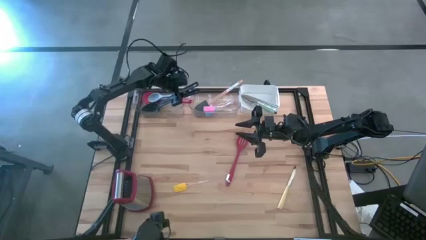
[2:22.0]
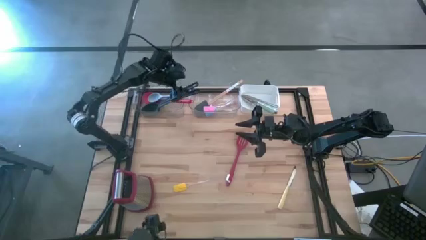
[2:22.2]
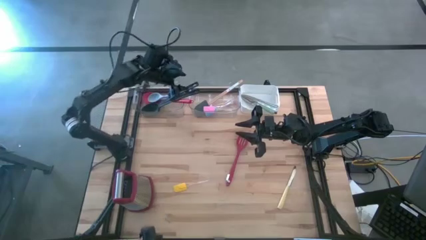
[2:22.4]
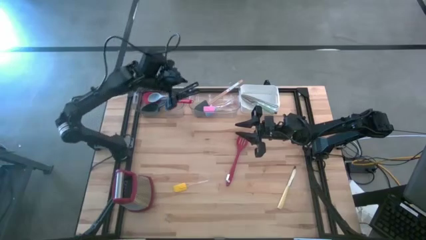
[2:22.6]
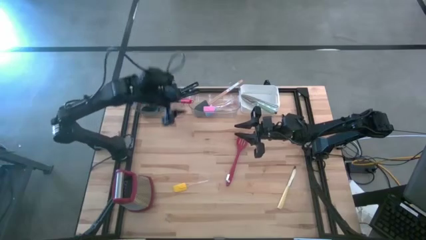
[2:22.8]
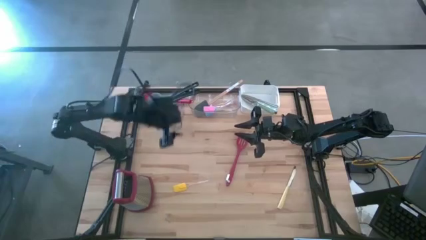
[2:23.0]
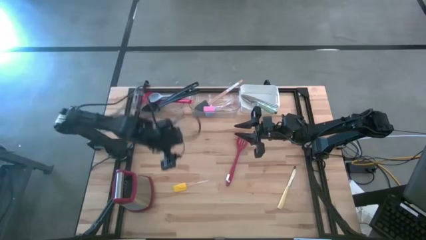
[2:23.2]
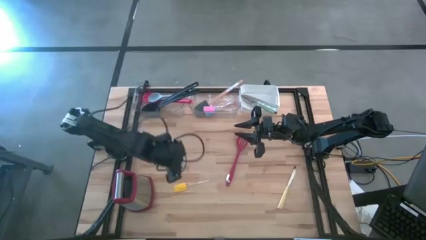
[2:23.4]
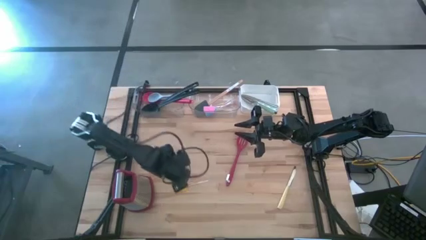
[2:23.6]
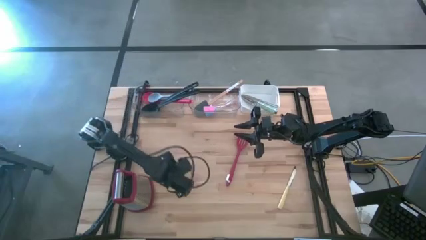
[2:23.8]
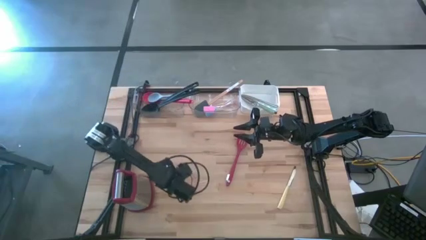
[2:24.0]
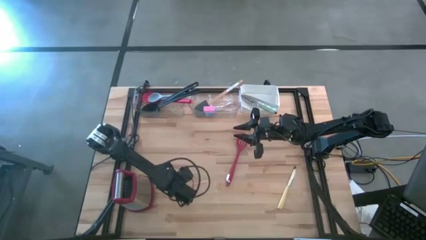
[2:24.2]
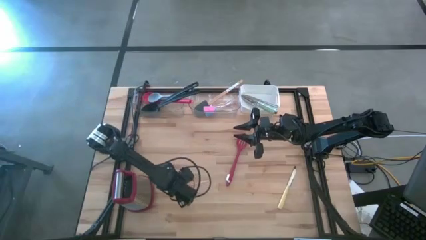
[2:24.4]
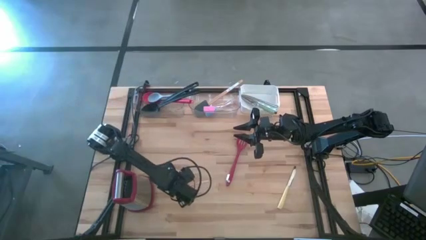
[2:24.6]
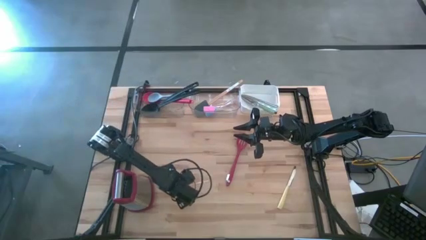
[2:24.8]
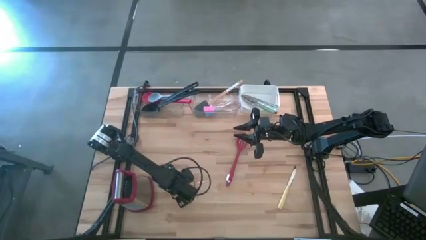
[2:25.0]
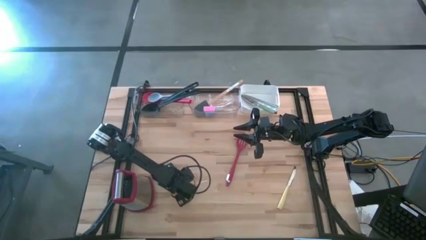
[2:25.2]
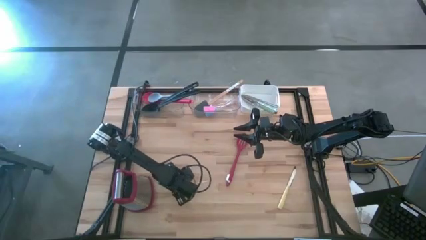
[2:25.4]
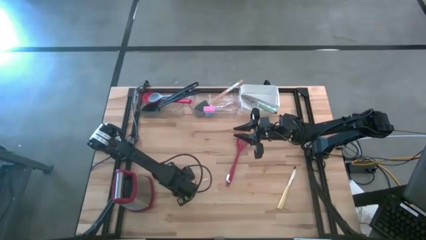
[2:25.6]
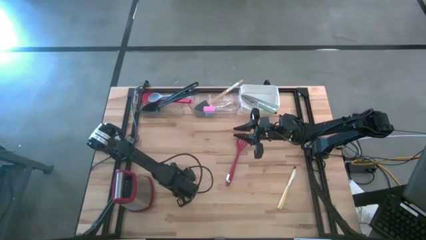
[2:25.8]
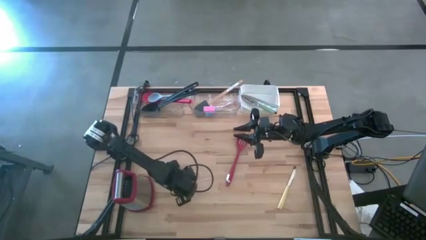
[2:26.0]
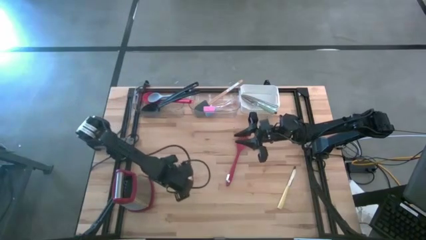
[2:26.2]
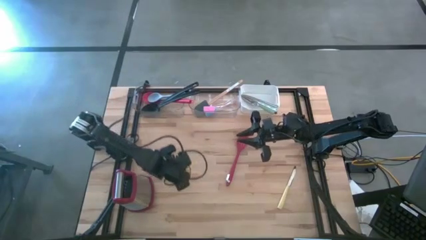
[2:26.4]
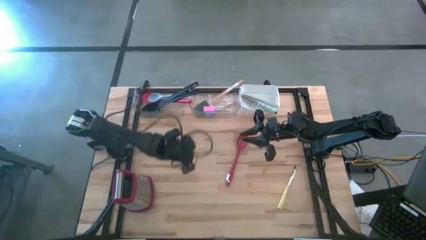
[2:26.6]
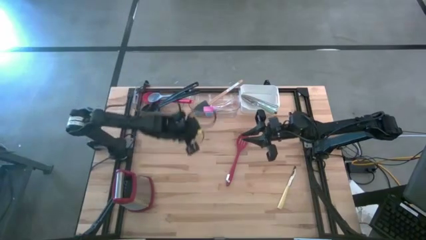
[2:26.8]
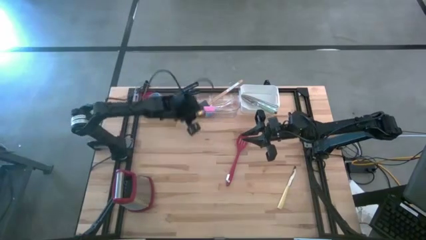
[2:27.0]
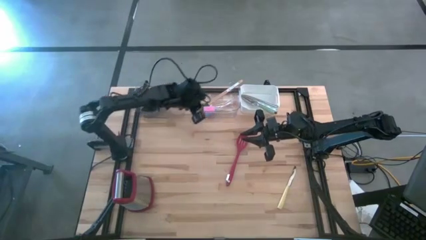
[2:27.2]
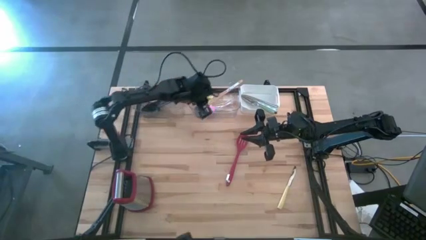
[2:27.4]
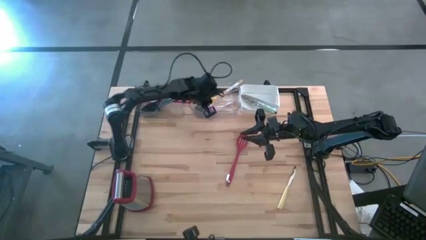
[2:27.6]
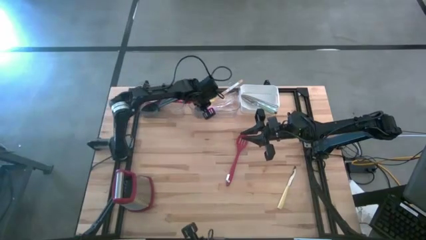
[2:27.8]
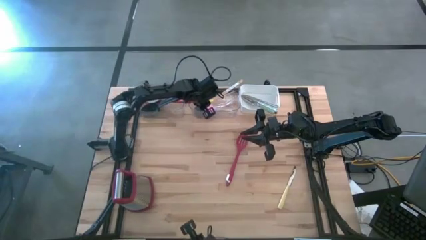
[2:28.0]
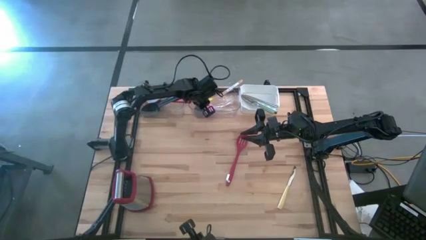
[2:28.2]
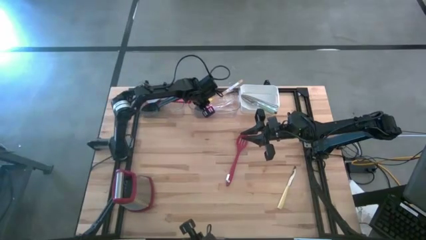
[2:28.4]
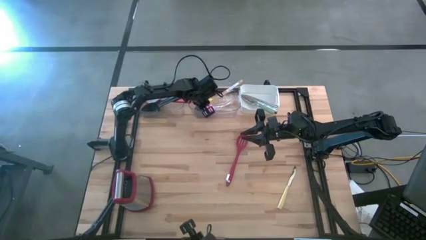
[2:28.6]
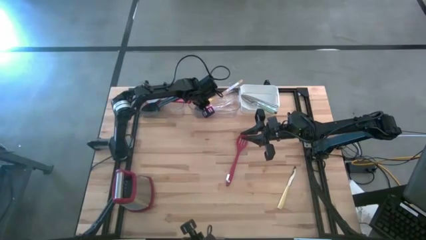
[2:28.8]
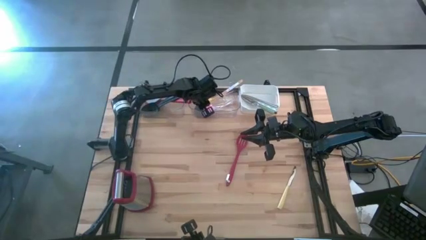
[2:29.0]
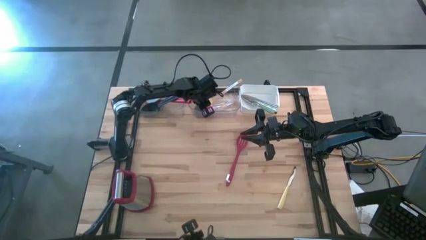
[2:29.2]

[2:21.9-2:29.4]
Task: Pick & Place Kitchen Items
Put the yellow spatula into the right transparent bin

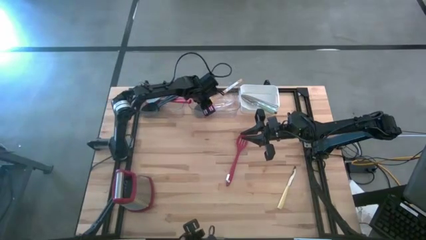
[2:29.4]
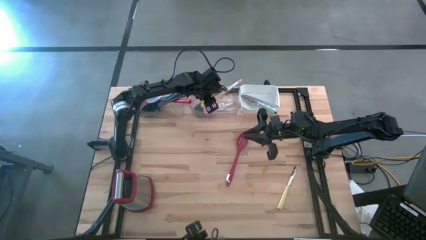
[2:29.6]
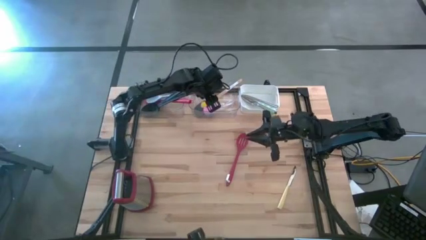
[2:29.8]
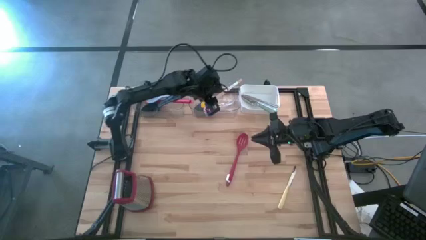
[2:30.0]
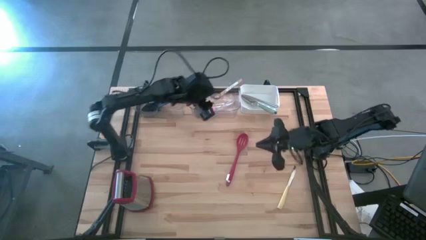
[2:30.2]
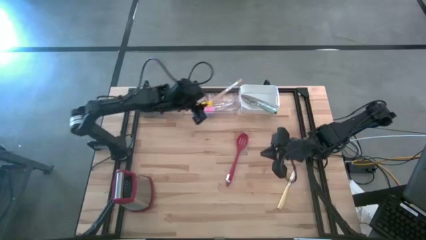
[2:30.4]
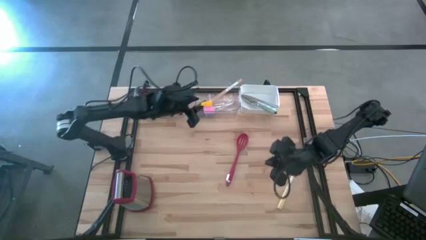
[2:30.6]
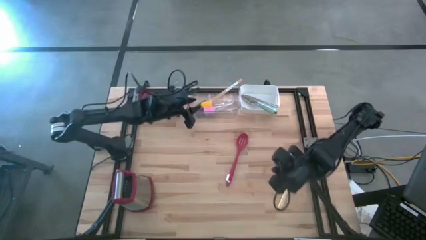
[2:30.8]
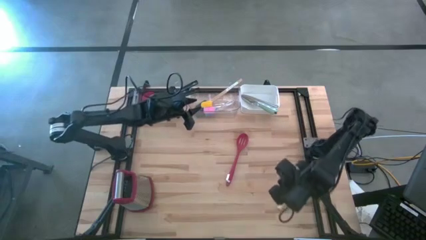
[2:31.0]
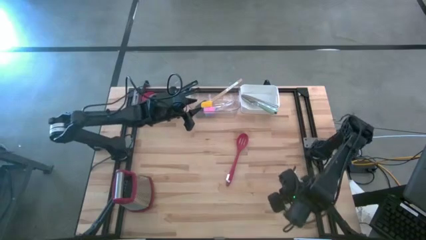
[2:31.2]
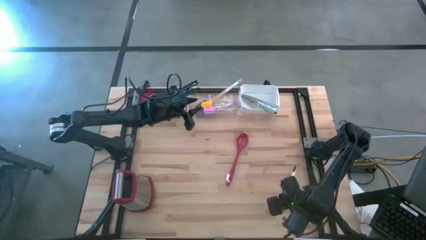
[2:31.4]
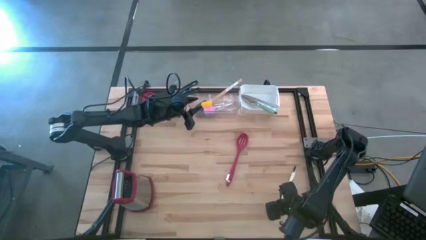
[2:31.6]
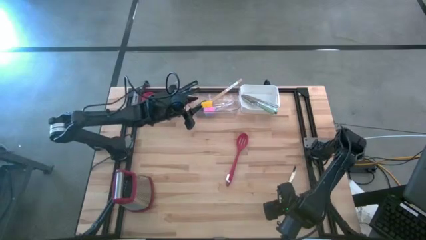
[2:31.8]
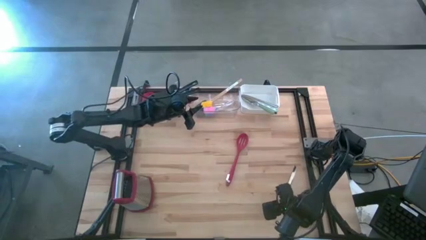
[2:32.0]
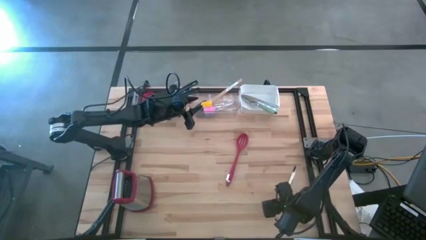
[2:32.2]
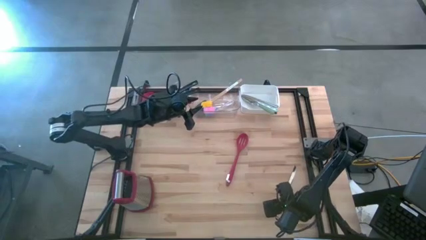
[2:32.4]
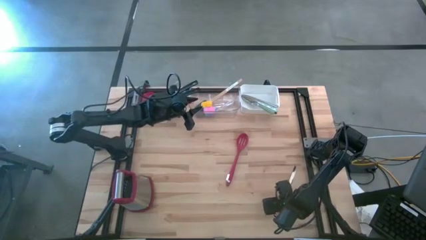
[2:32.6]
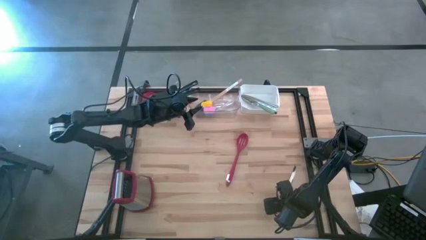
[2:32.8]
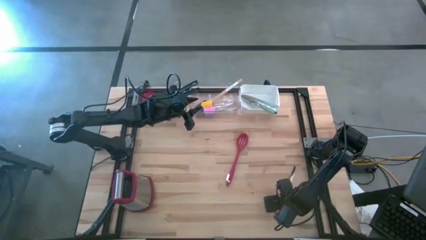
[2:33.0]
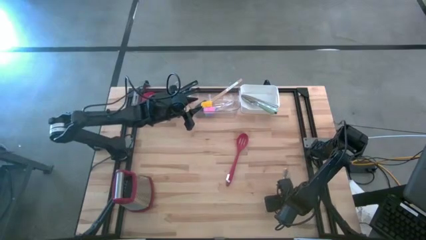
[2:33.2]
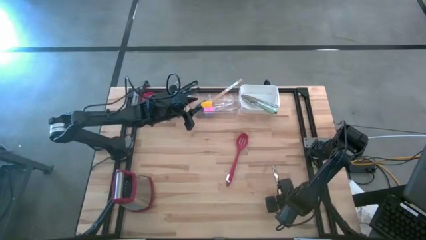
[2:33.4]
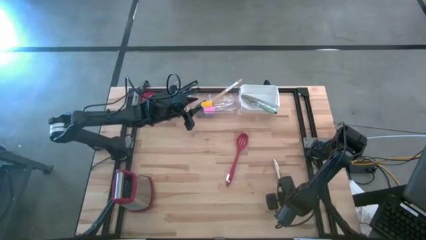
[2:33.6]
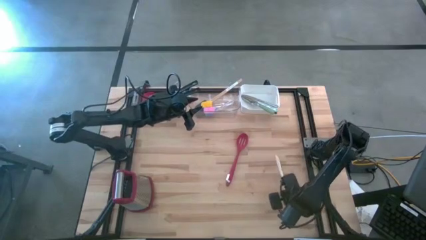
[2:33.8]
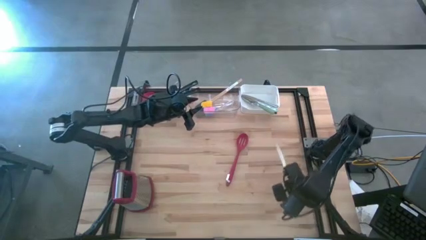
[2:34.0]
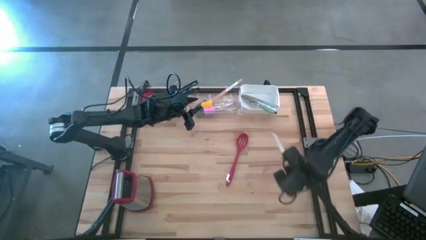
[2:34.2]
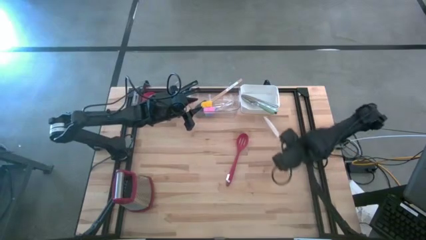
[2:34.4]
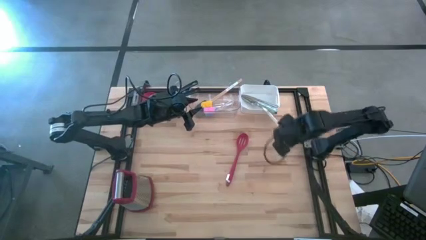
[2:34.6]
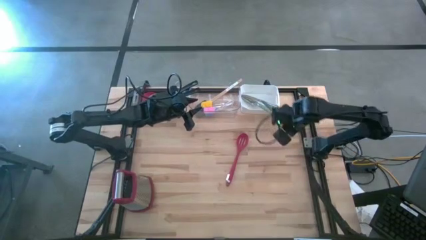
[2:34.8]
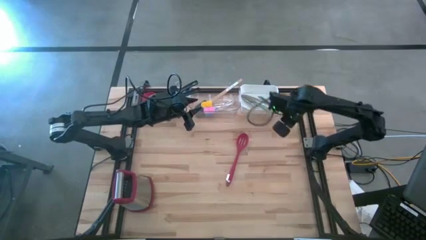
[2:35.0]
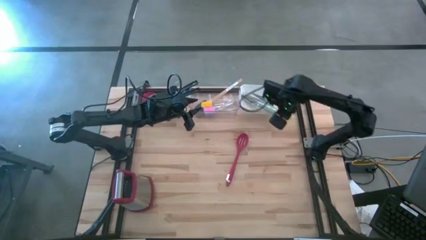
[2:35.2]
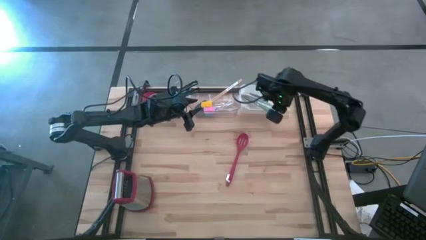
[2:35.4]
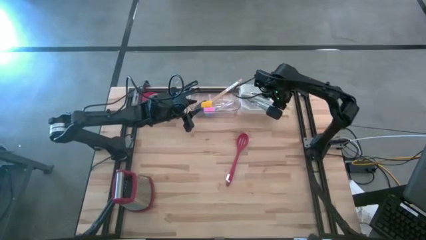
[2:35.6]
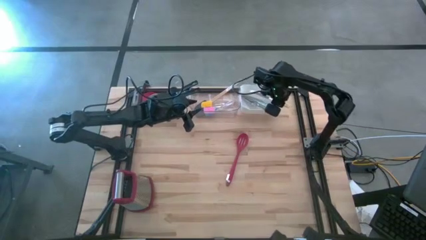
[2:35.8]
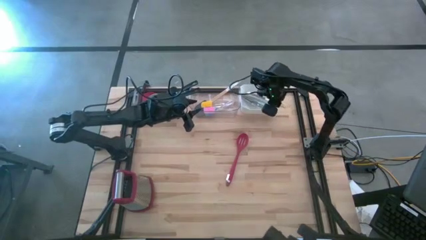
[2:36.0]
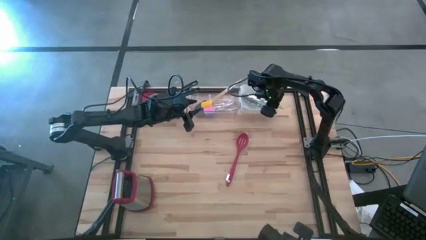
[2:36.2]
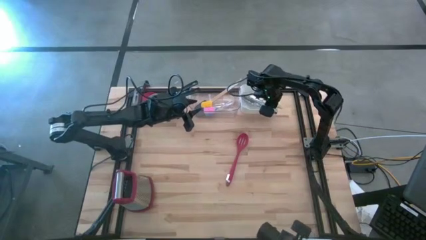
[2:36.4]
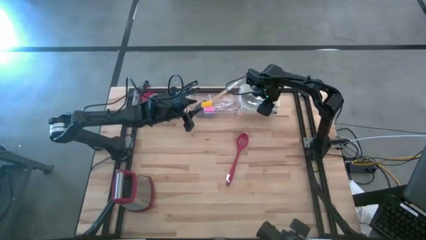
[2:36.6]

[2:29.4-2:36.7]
Put the white table knife into white bin
